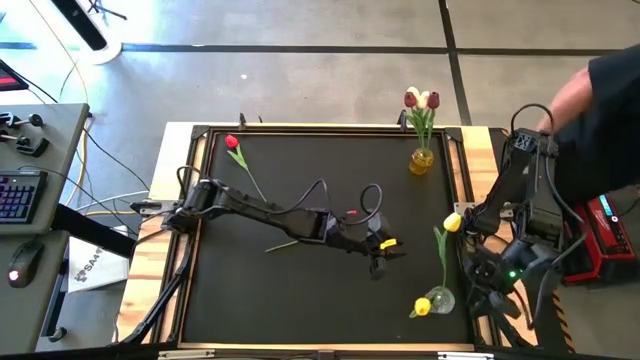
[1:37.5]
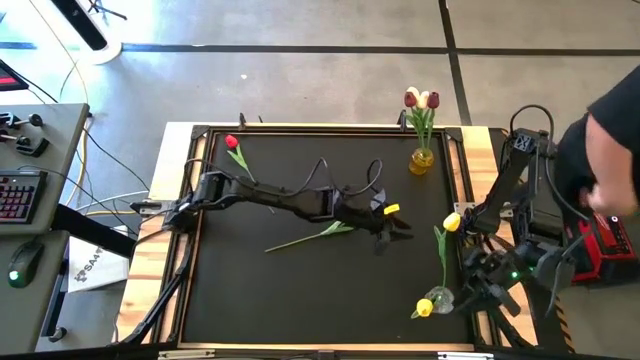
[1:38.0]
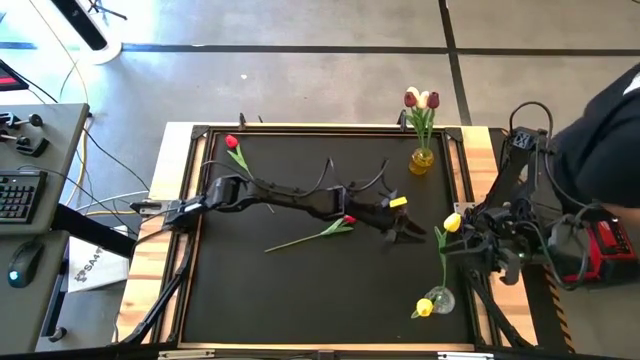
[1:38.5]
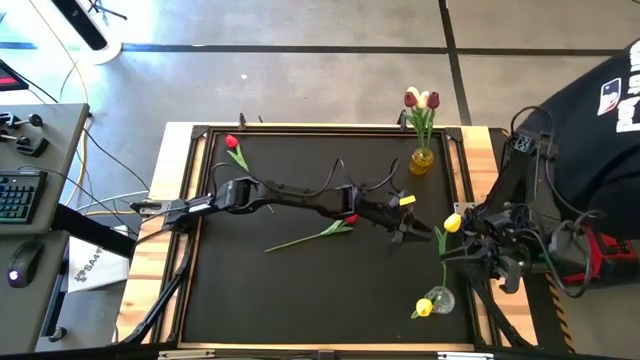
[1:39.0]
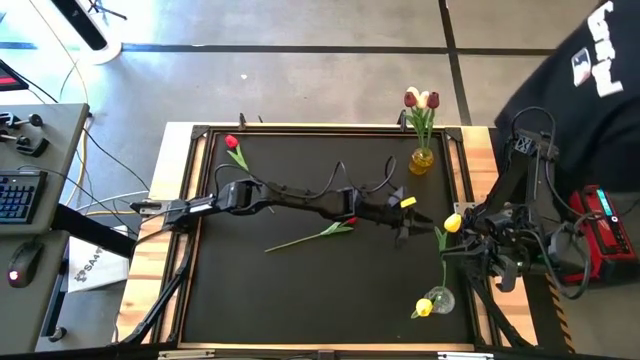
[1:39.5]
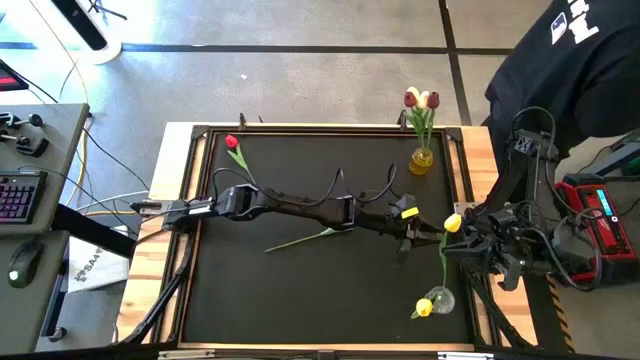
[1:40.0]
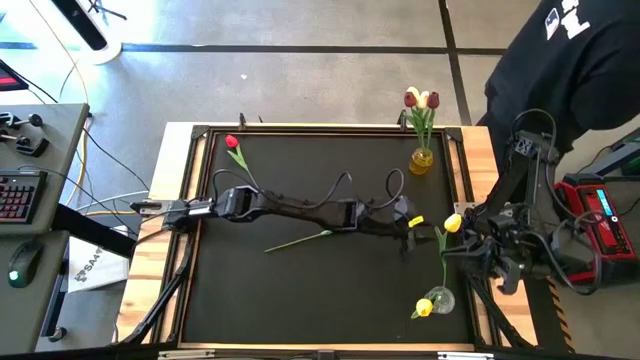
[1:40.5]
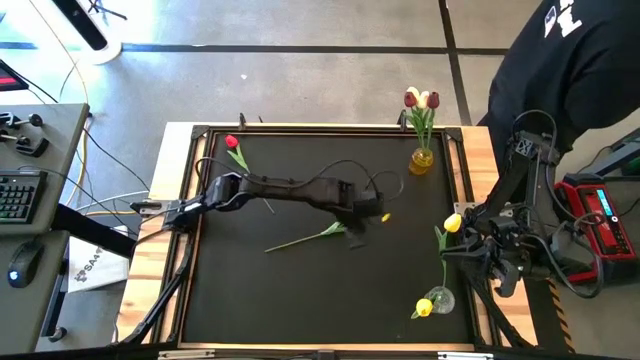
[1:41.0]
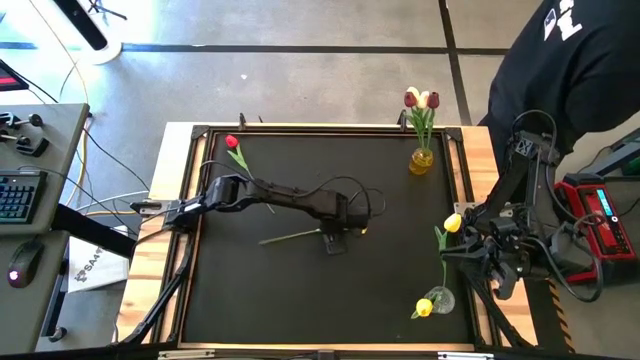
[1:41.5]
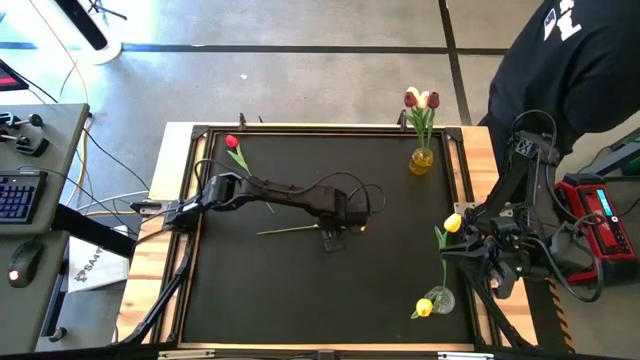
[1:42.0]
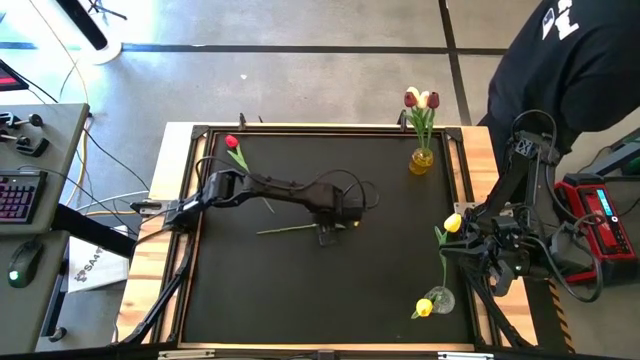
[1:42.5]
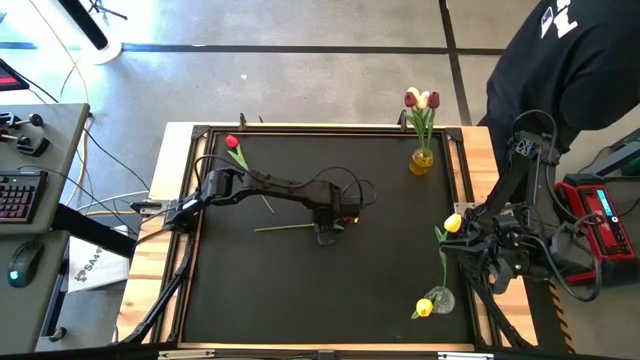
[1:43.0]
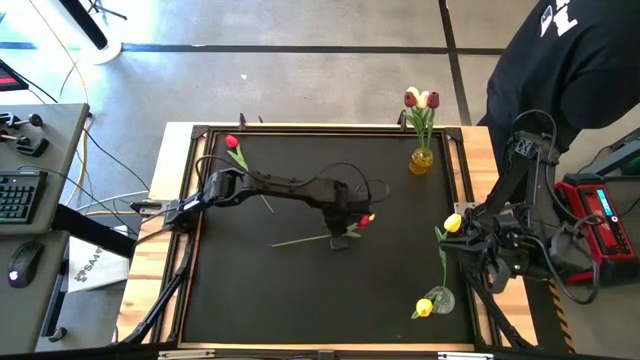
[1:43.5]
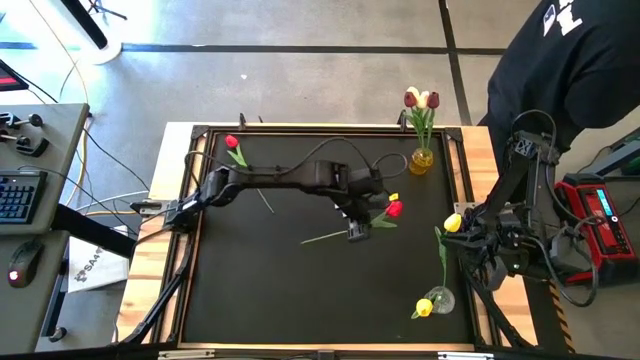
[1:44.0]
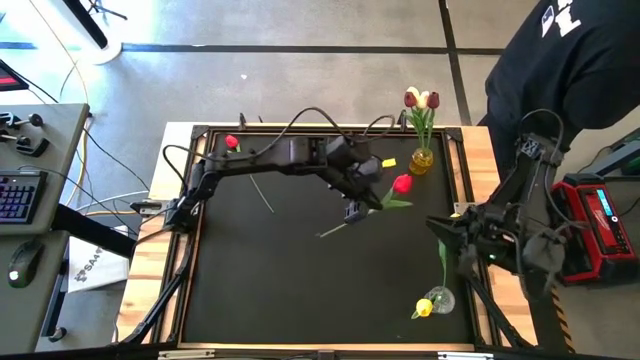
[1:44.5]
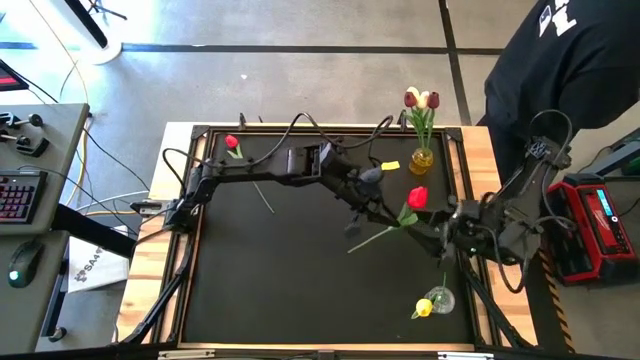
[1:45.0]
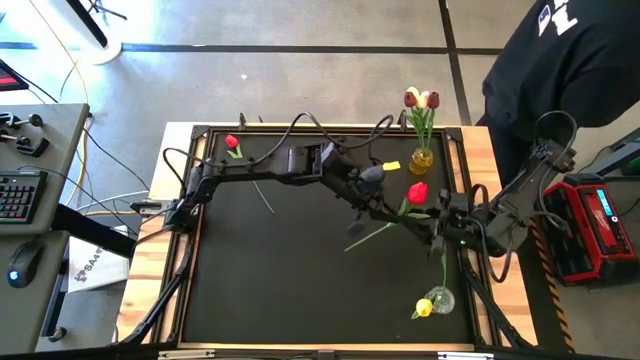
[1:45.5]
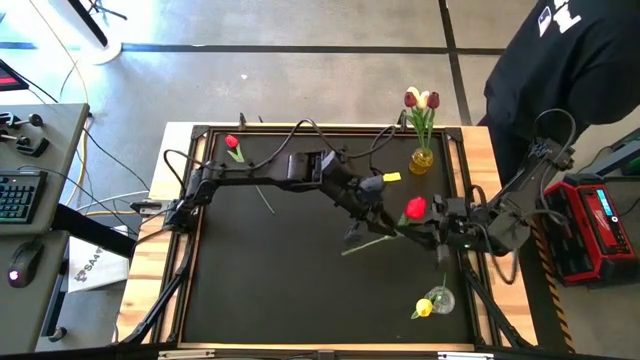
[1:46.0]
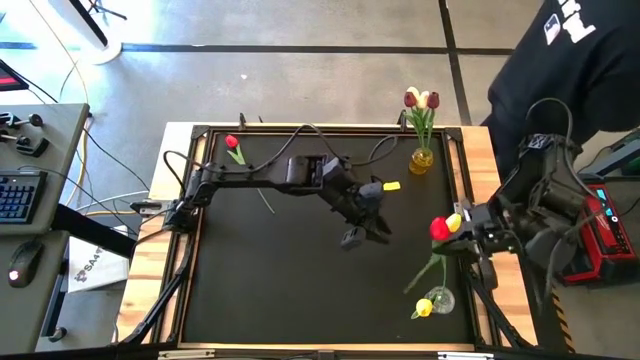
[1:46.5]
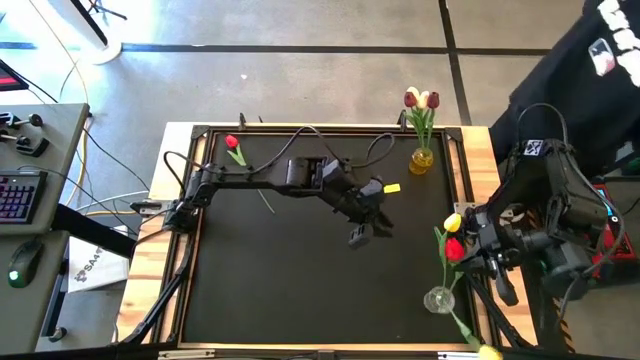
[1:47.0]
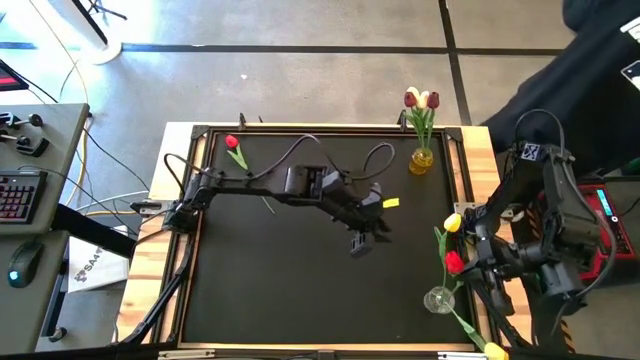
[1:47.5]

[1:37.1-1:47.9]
Task: Sort flowers into vase by color
Put the bottom red flower into the transparent flower vase

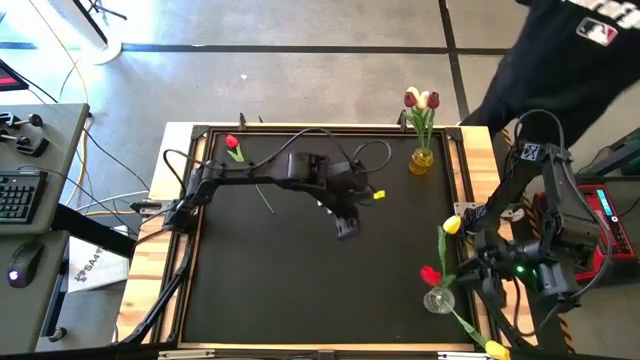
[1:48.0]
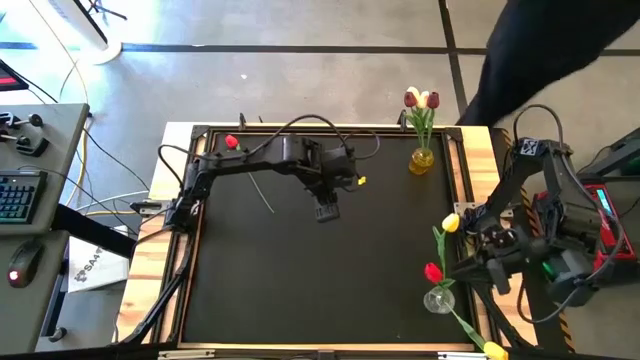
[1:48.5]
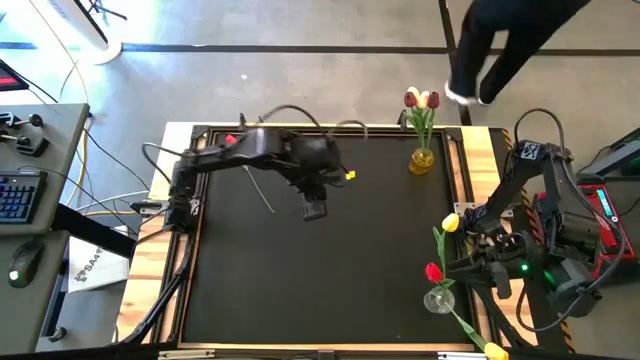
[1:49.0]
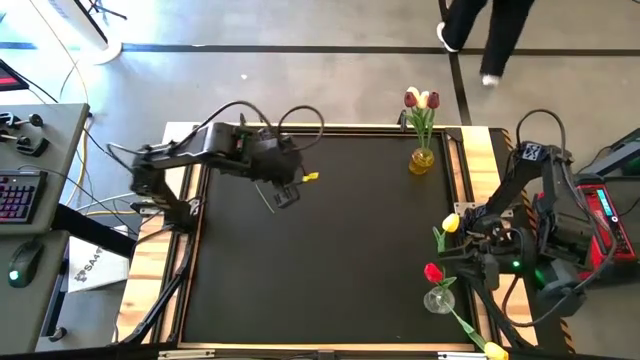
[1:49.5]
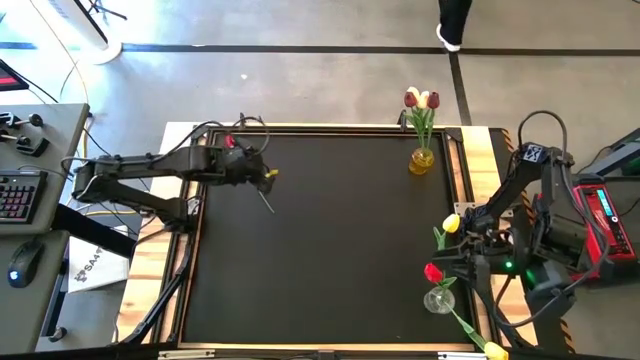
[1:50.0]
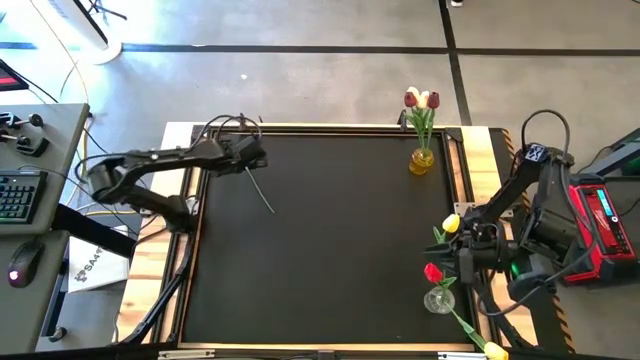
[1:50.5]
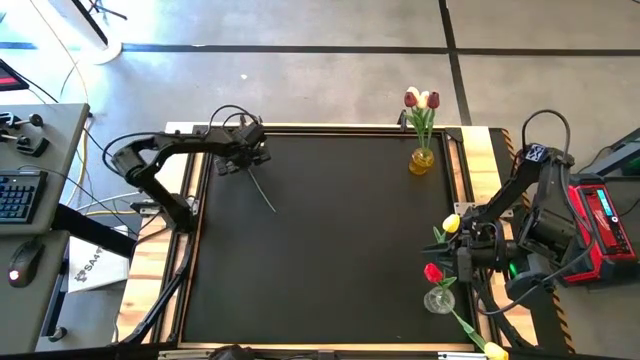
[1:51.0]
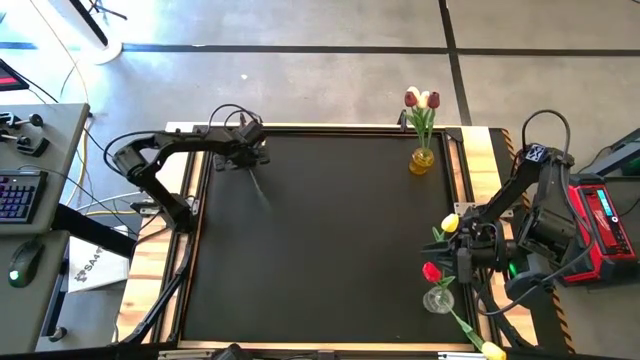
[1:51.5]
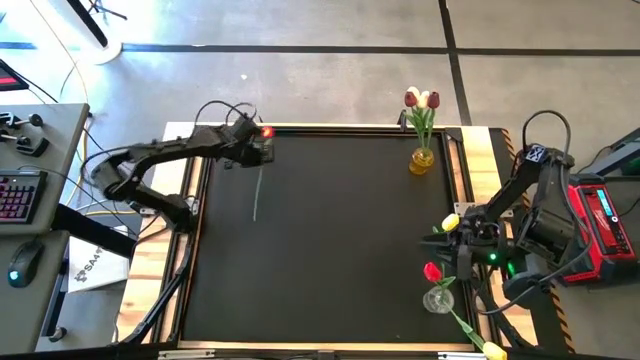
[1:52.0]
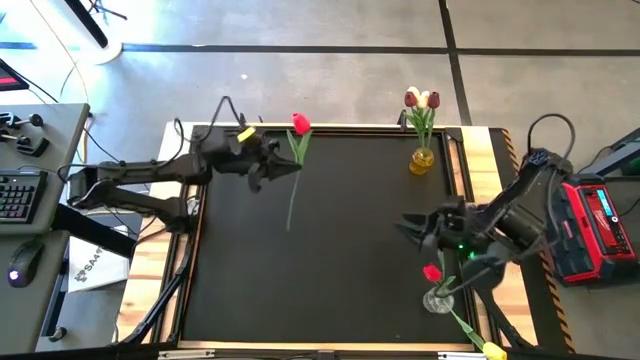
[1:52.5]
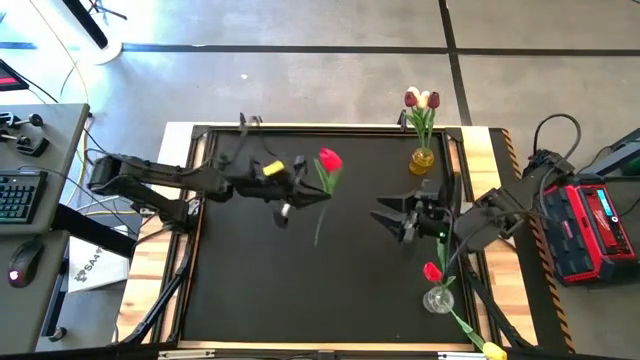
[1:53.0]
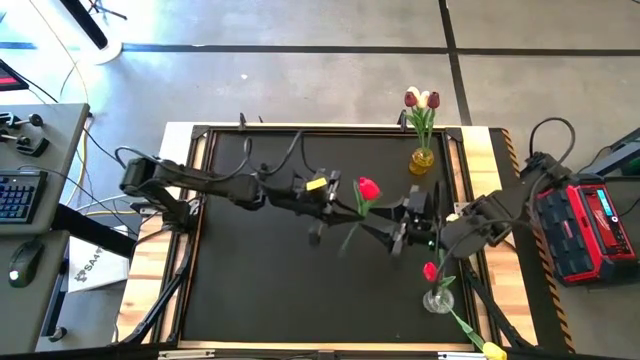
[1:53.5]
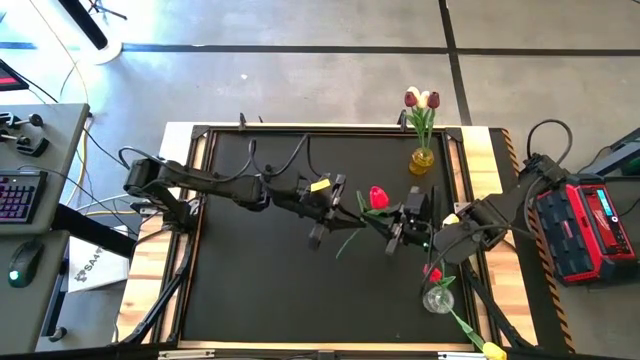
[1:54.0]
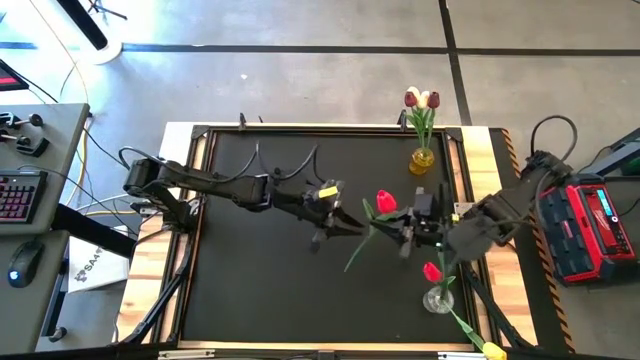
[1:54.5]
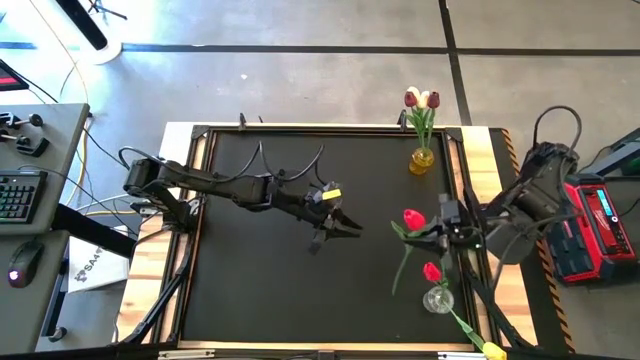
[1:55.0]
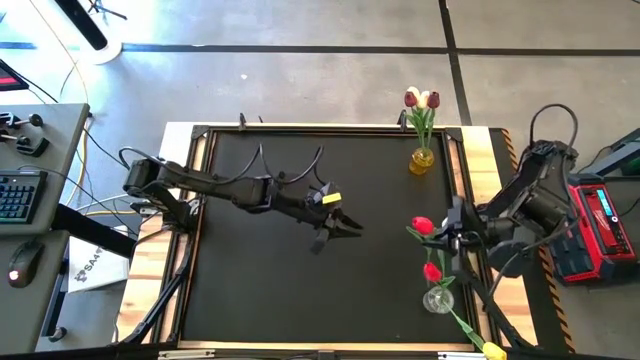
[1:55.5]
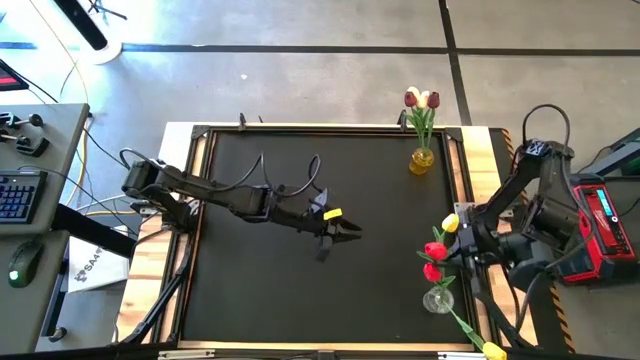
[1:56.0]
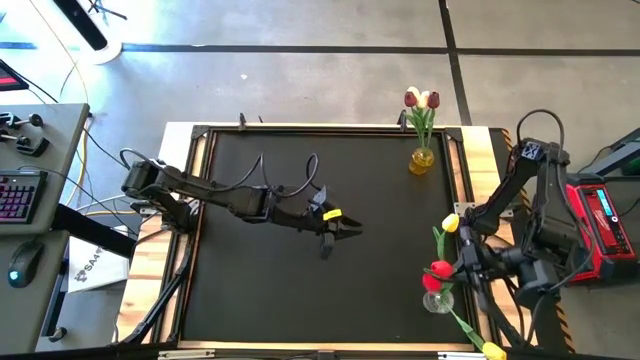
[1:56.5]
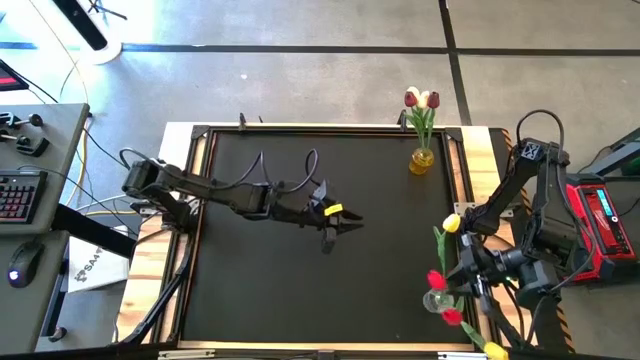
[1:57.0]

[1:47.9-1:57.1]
Put the red flower into the transparent flower vase
